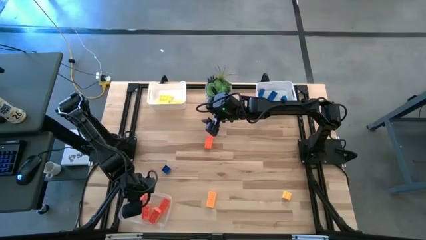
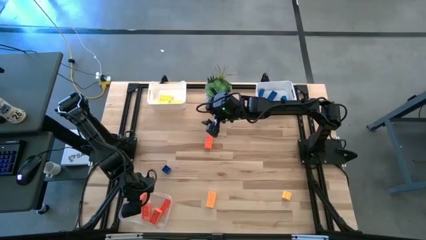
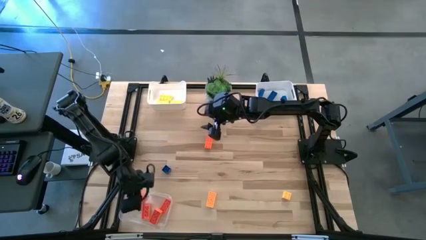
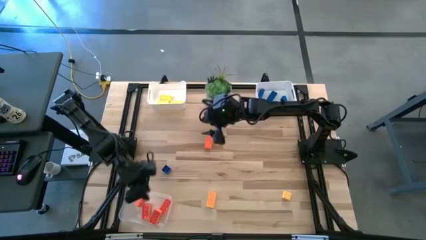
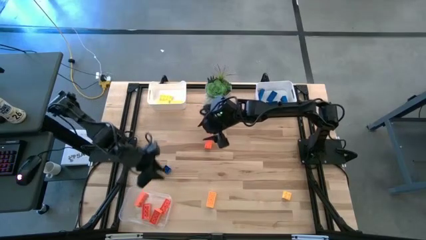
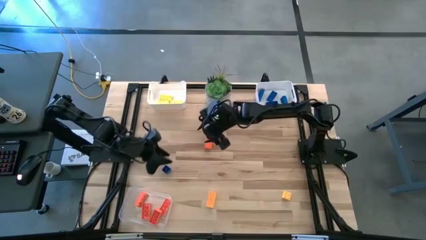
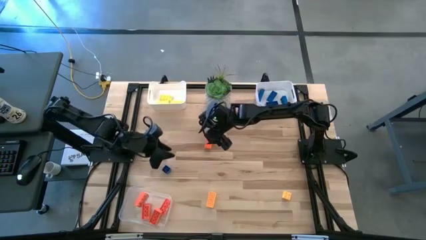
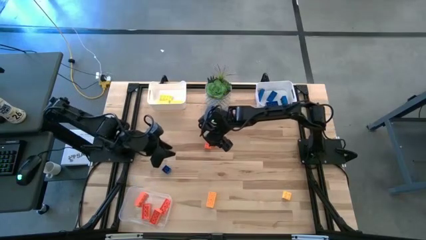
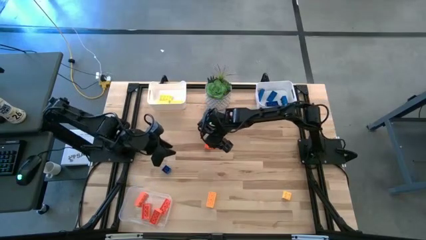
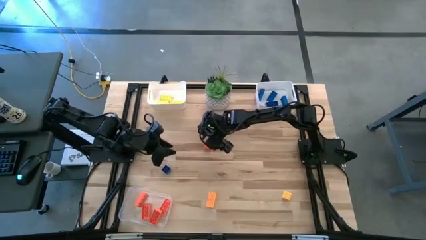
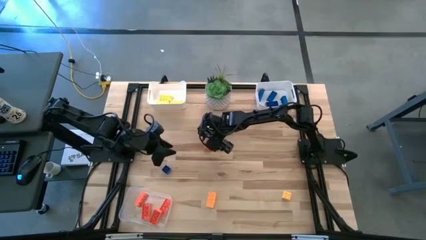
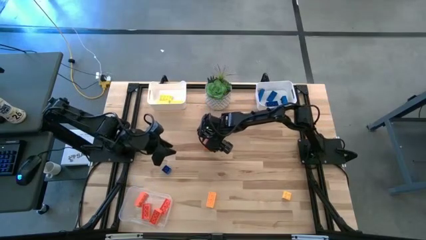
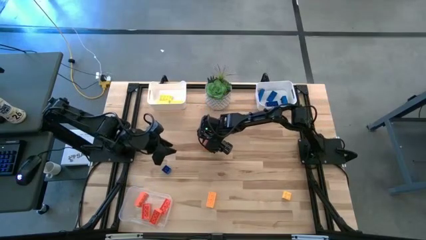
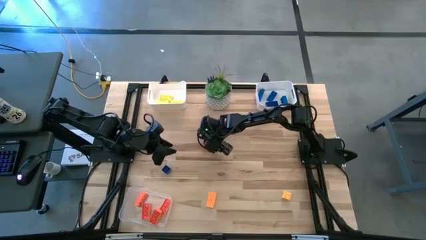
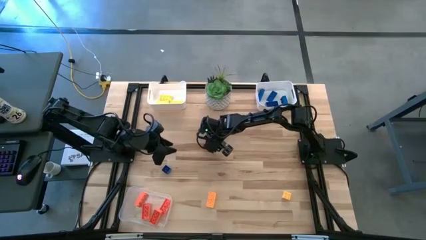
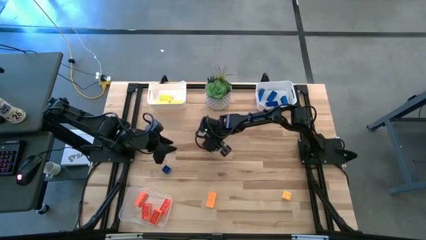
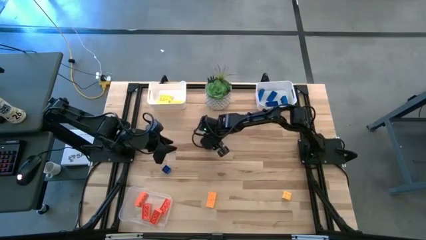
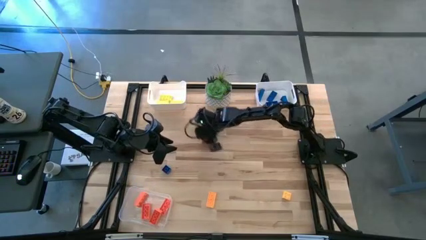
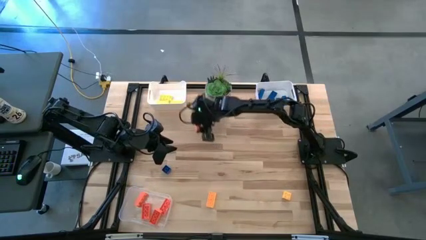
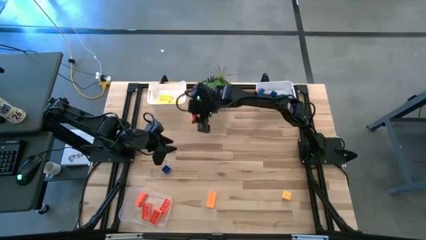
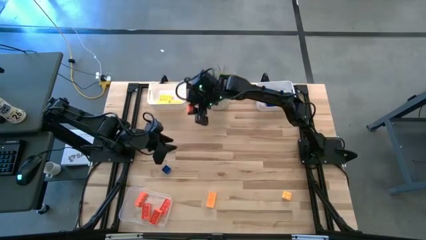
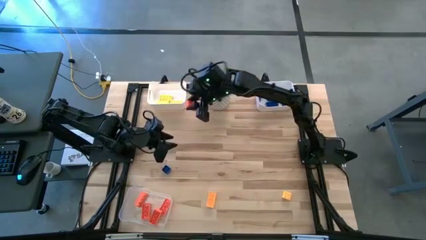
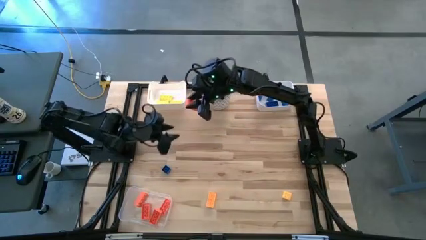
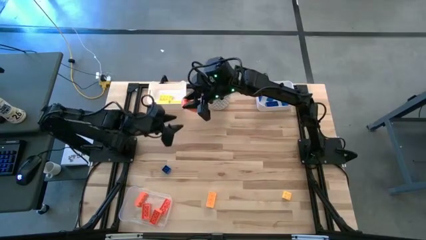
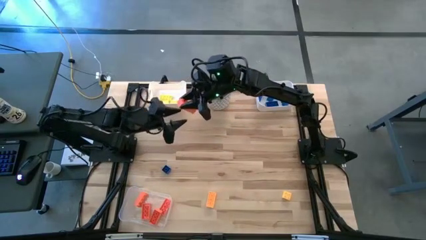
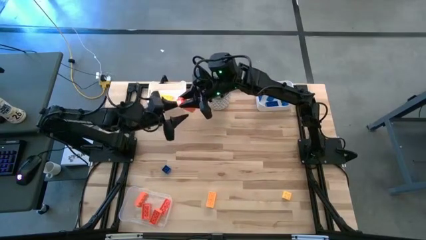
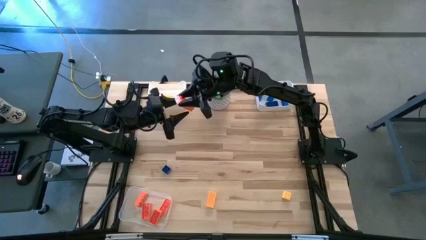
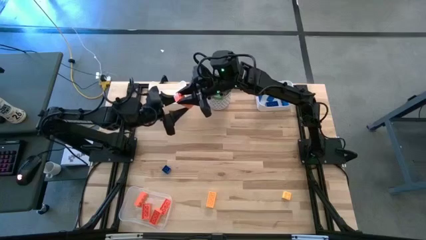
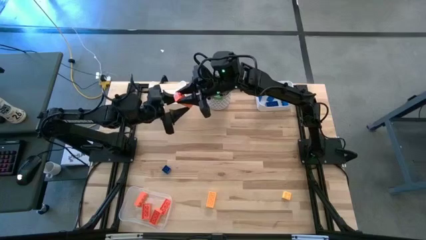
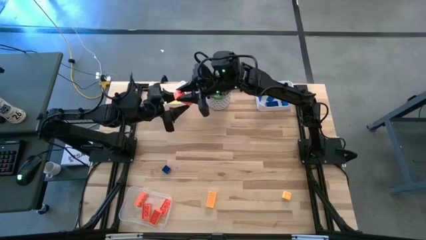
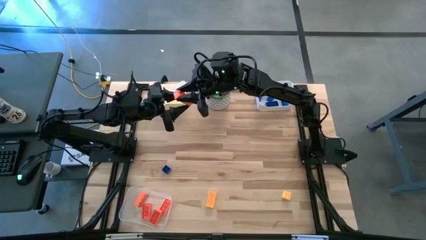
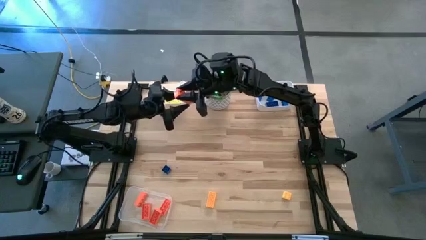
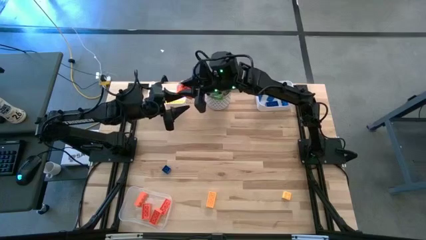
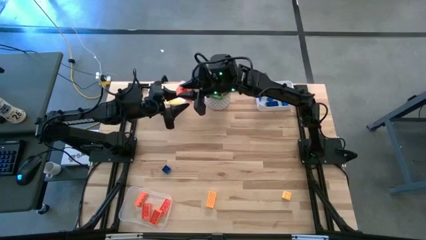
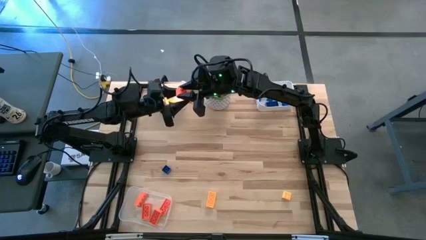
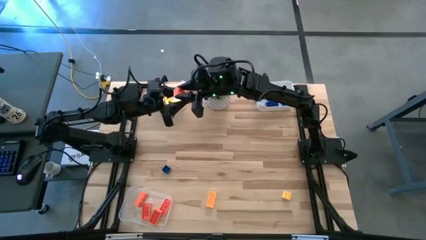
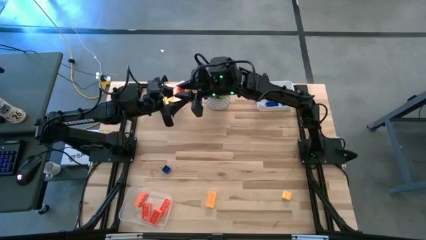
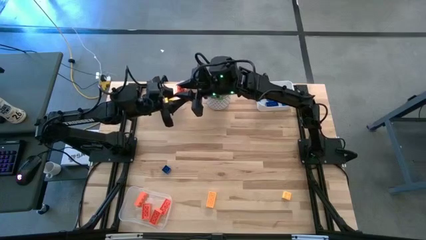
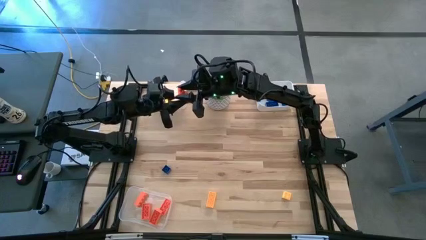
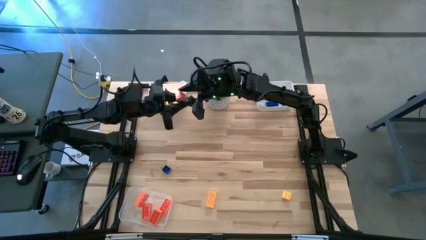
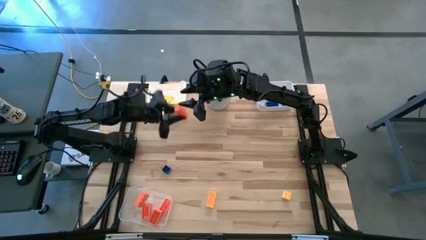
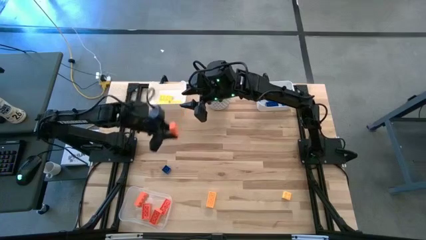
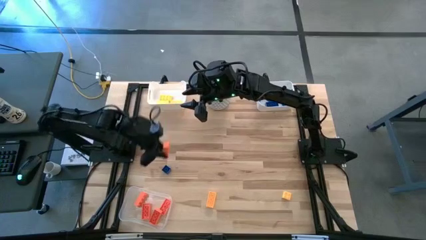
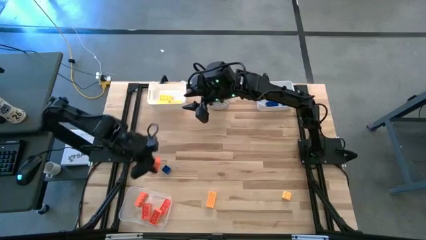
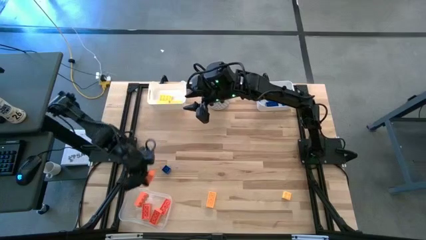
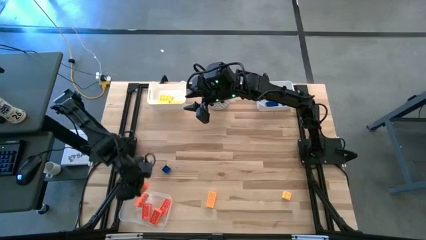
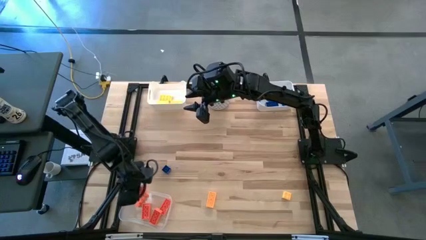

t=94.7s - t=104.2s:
Task: Sort & place blocks by color
Put the orange game piece into the transparent bin

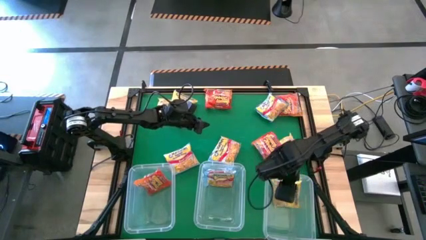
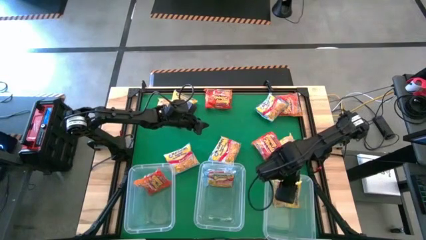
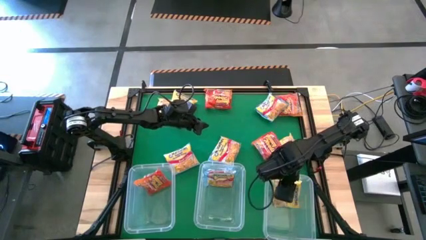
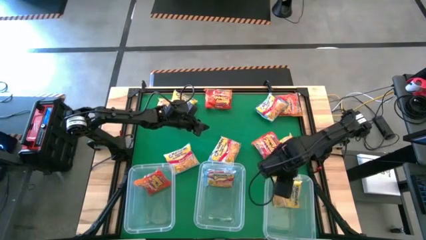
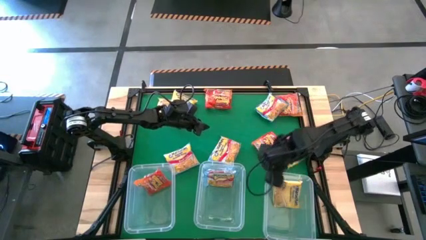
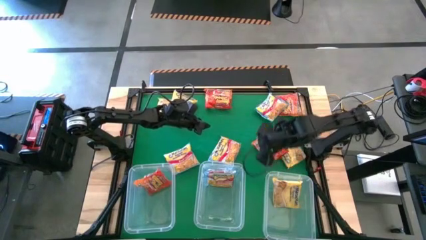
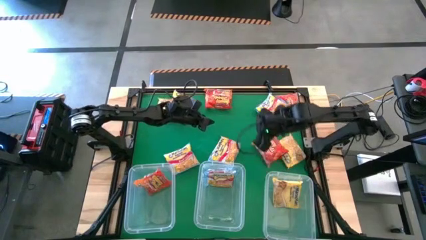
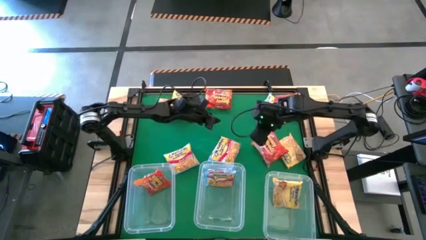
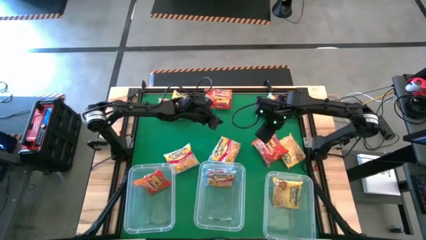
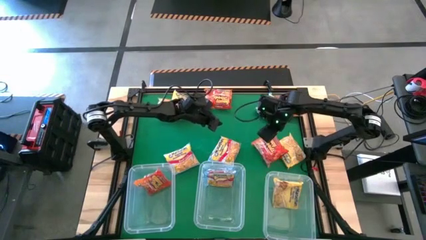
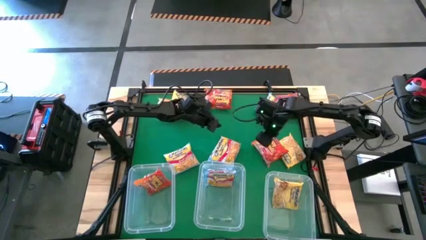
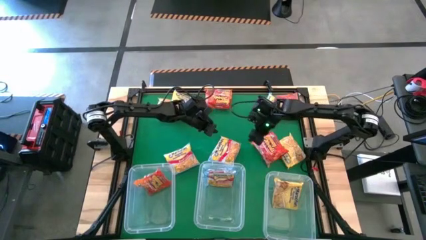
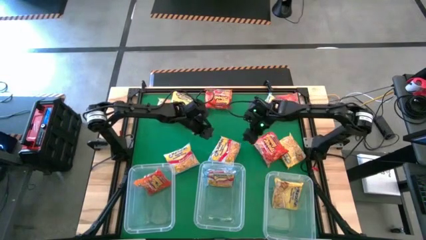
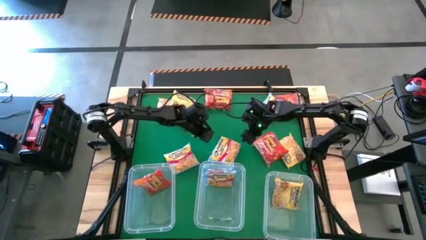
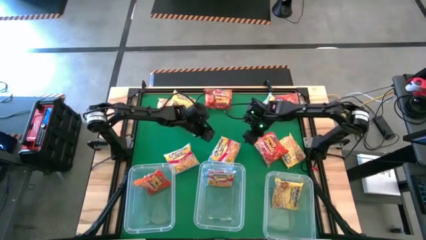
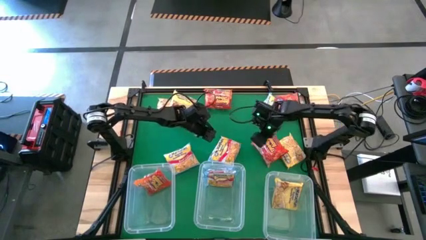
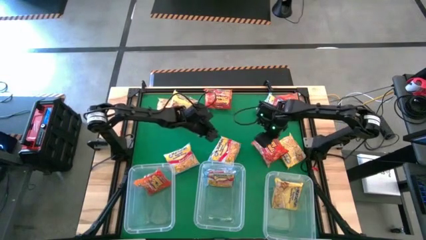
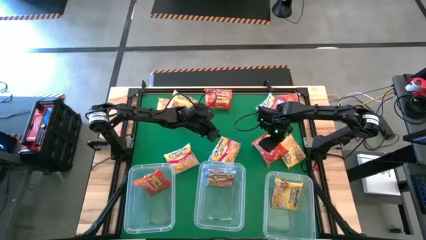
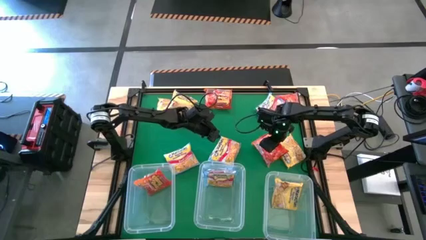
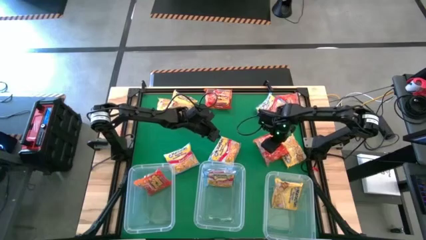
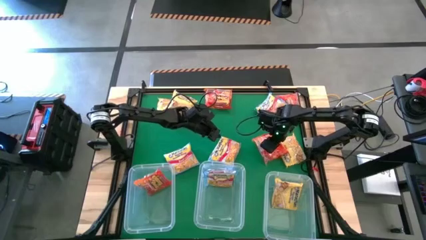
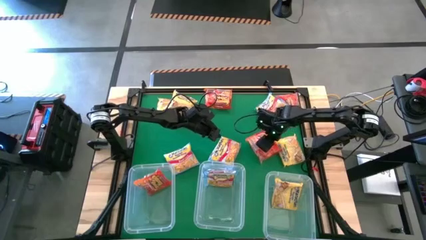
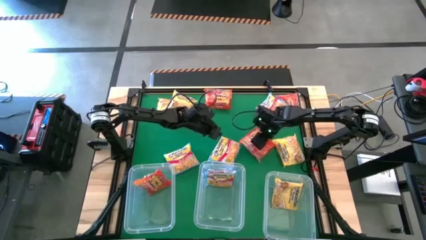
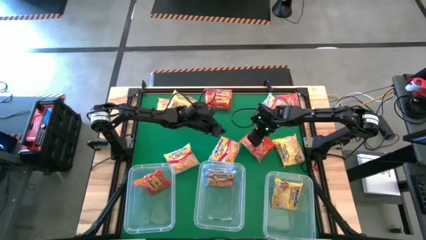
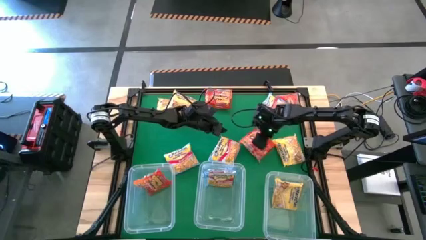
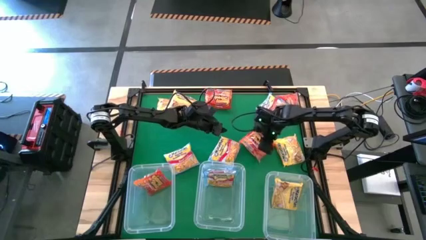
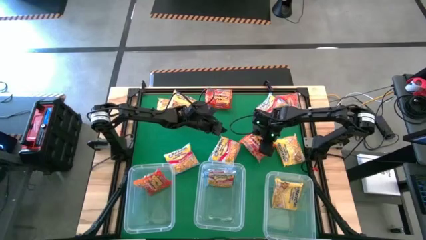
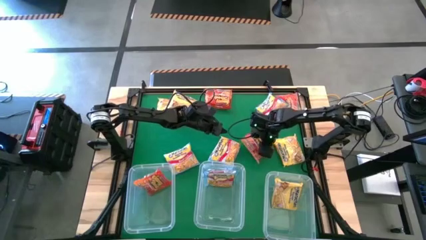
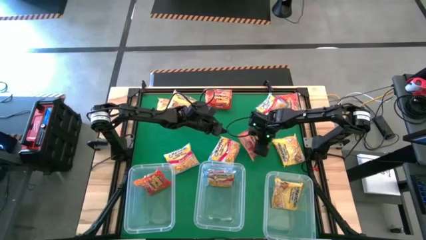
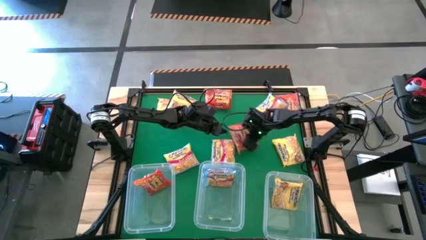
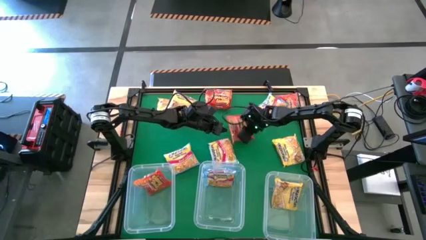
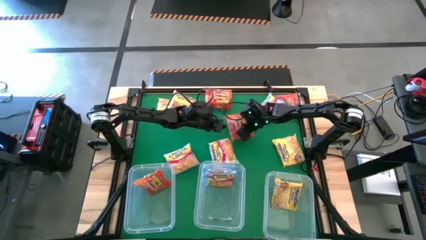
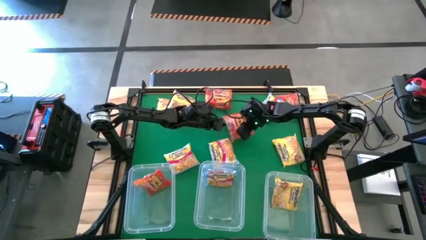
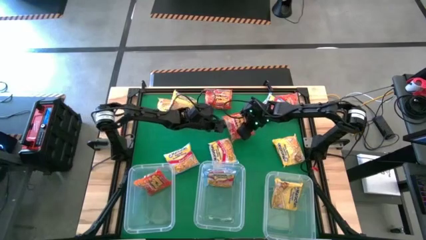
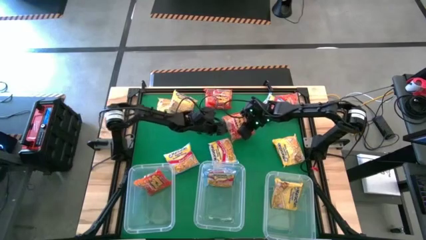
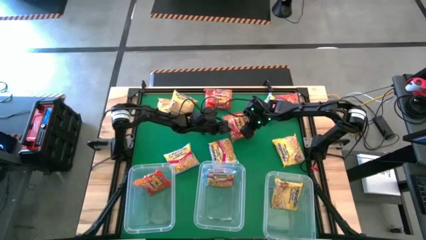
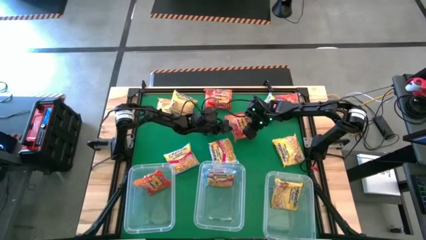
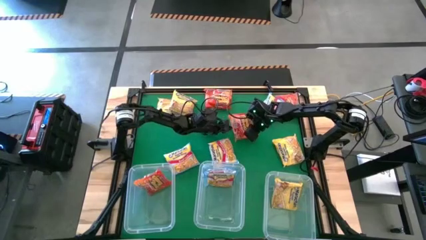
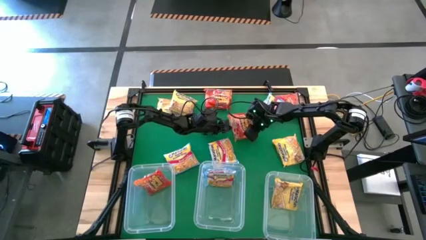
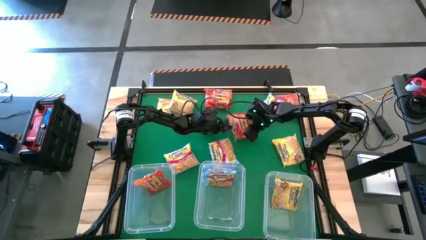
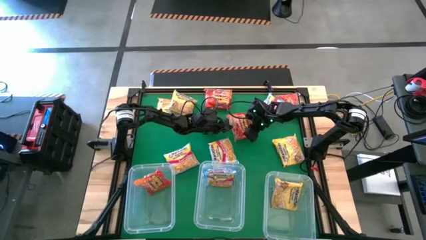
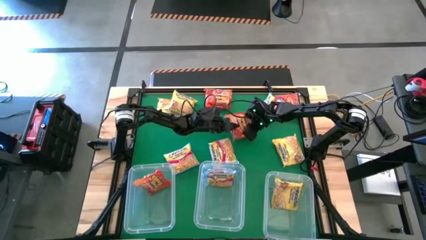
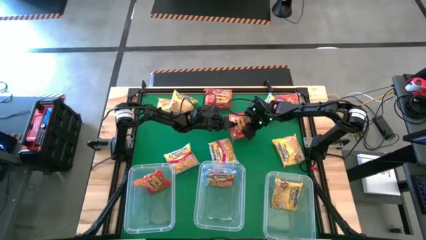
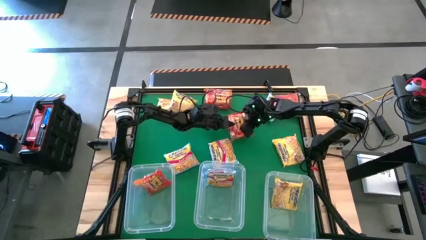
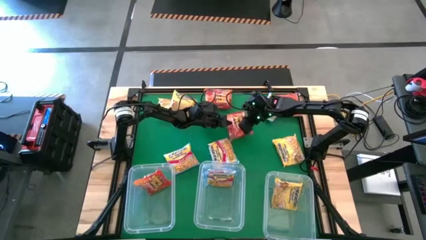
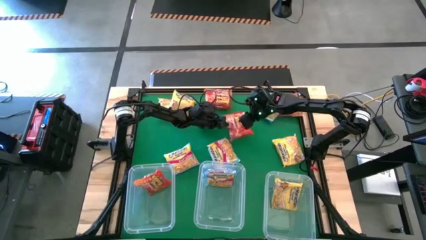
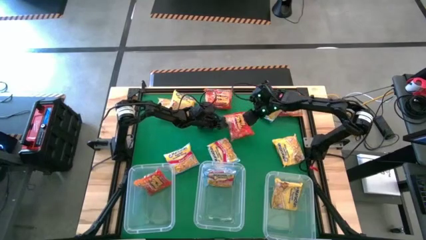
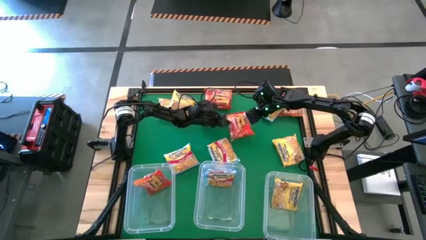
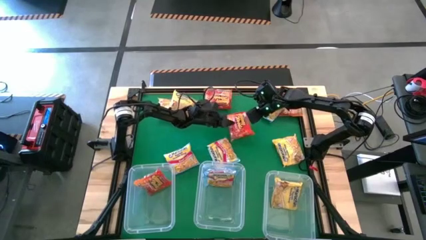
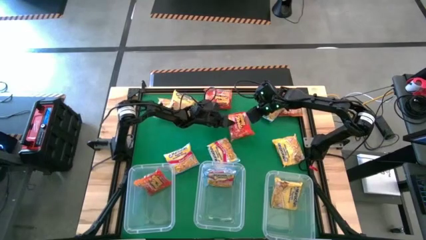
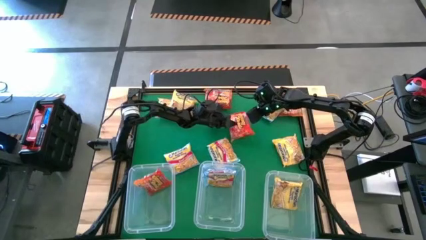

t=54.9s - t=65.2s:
Task: Sort Maruchan noodles
Put the orange noodle pack into the left transparent bin
